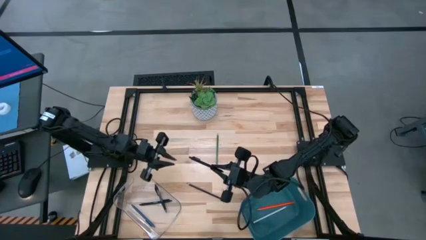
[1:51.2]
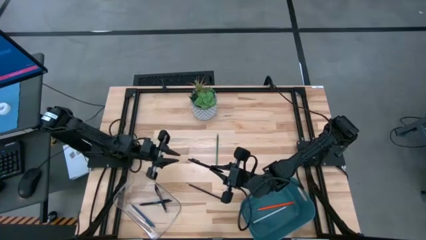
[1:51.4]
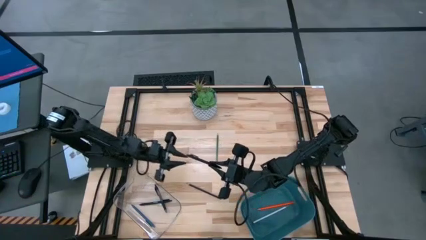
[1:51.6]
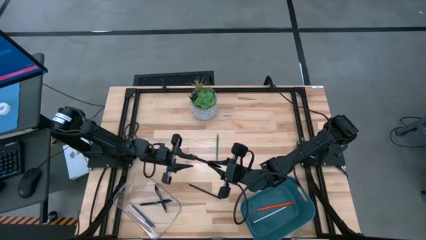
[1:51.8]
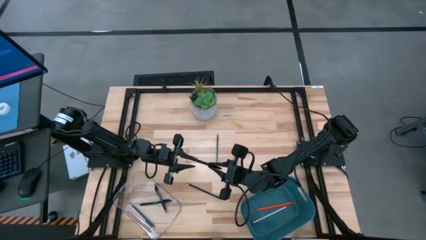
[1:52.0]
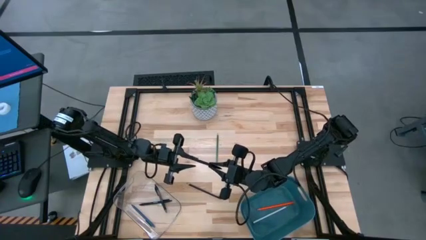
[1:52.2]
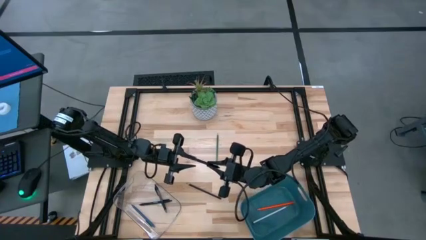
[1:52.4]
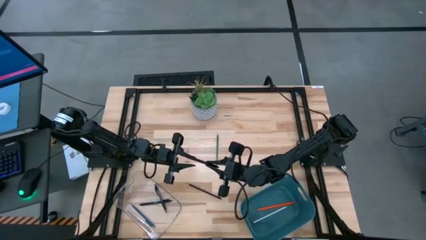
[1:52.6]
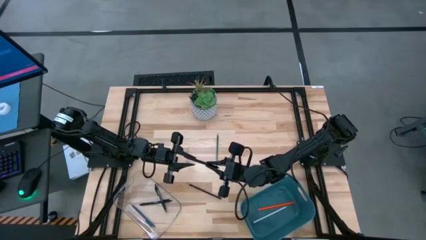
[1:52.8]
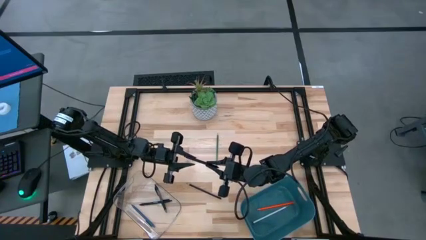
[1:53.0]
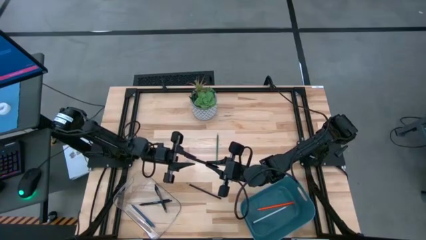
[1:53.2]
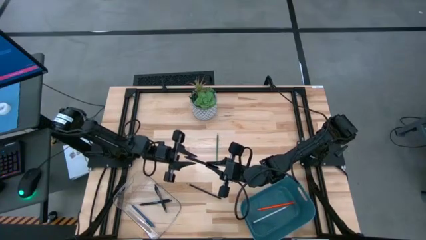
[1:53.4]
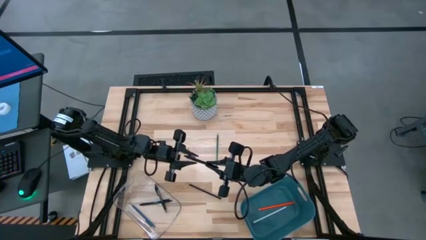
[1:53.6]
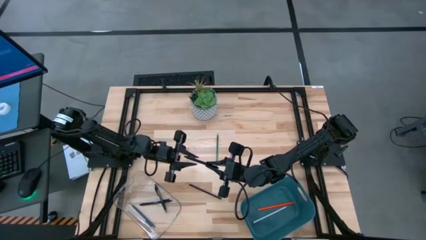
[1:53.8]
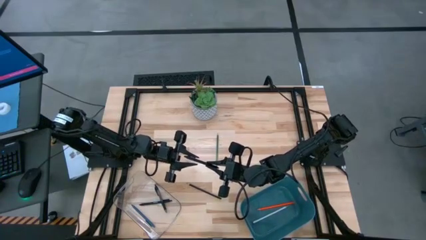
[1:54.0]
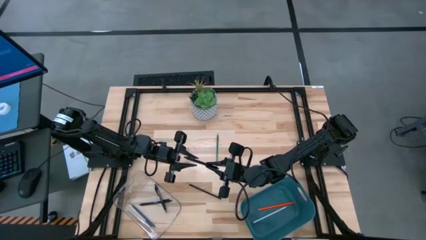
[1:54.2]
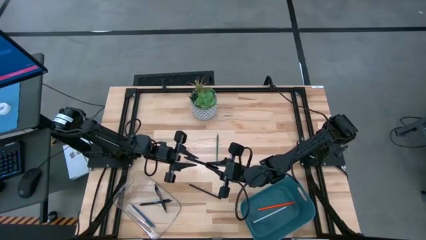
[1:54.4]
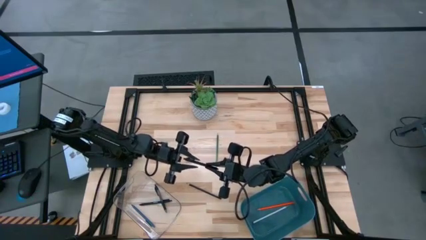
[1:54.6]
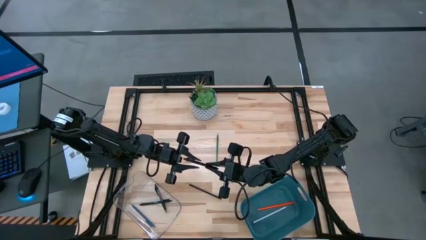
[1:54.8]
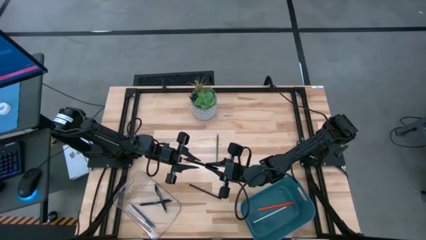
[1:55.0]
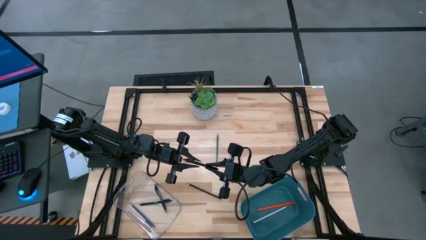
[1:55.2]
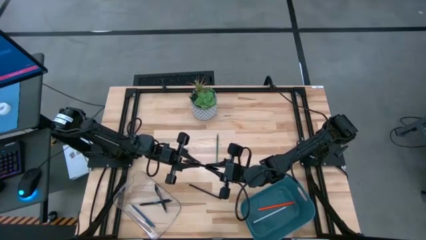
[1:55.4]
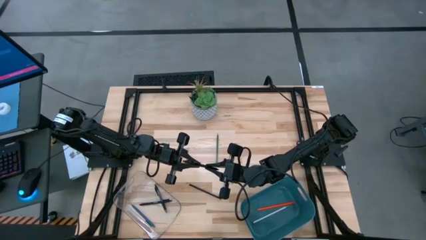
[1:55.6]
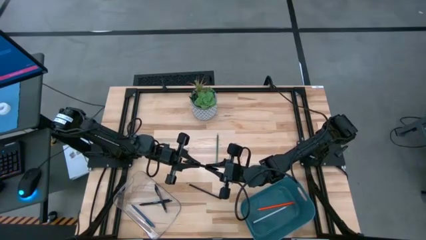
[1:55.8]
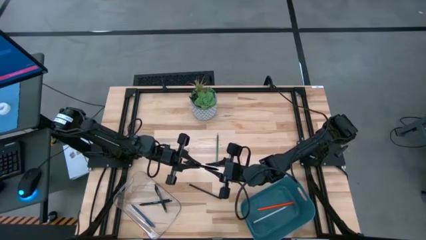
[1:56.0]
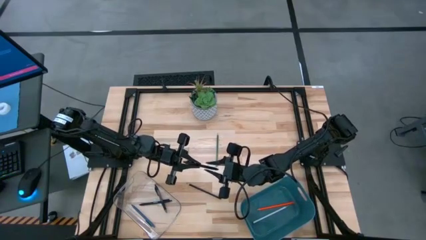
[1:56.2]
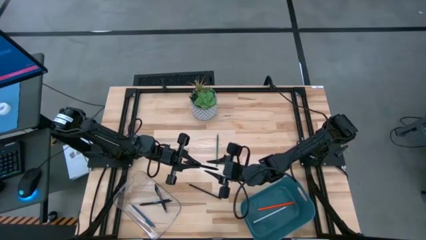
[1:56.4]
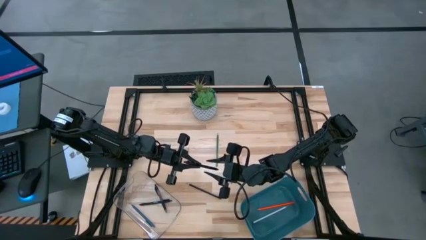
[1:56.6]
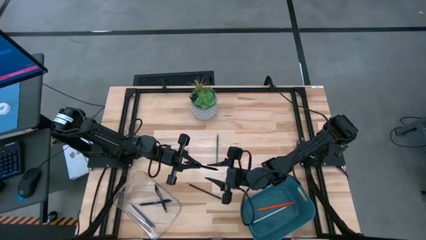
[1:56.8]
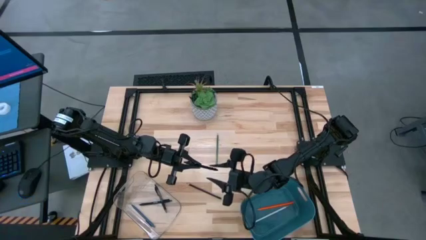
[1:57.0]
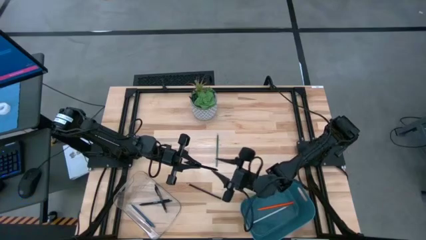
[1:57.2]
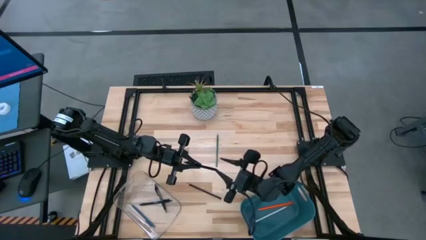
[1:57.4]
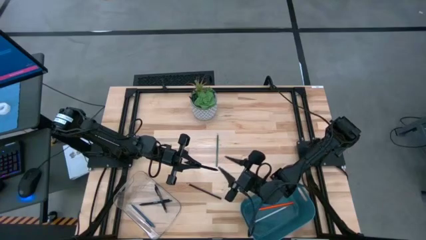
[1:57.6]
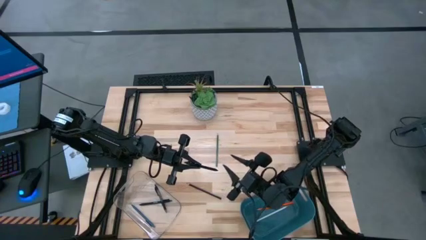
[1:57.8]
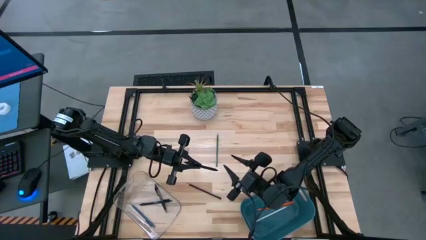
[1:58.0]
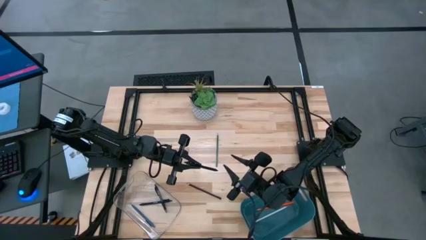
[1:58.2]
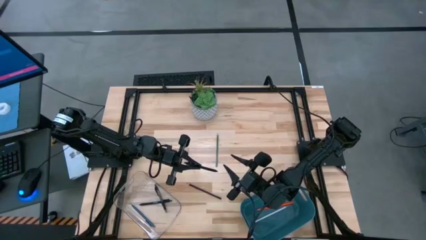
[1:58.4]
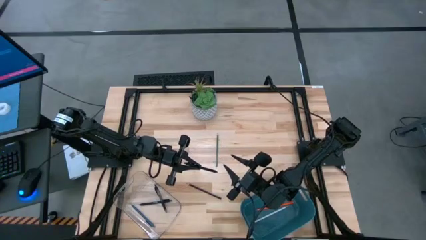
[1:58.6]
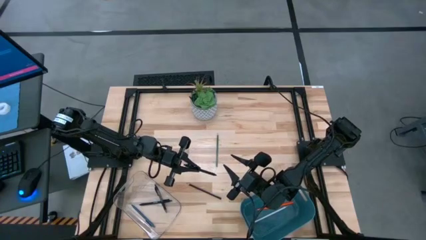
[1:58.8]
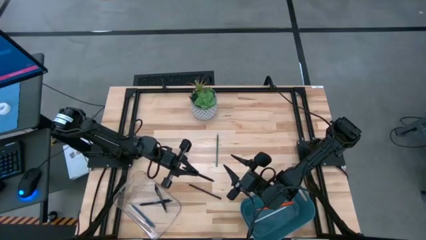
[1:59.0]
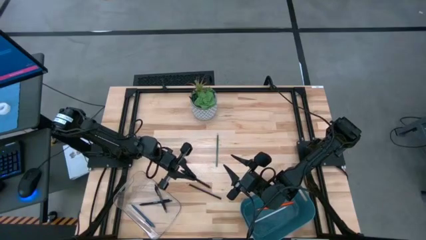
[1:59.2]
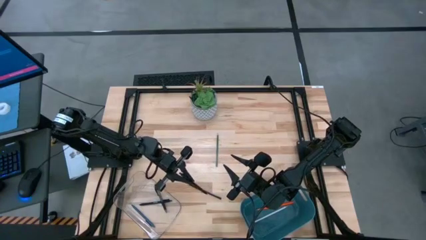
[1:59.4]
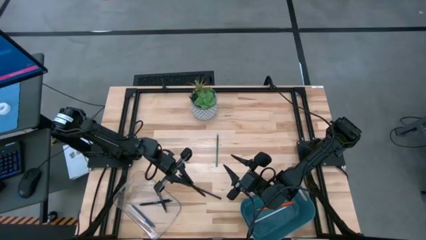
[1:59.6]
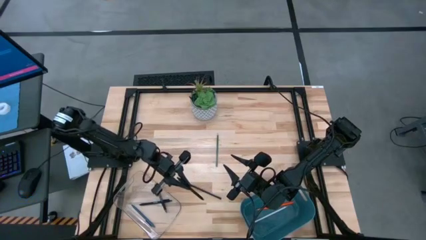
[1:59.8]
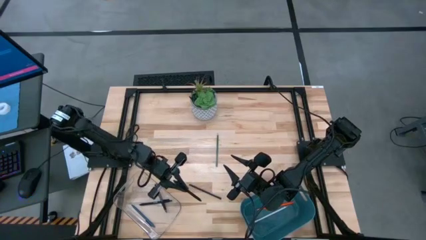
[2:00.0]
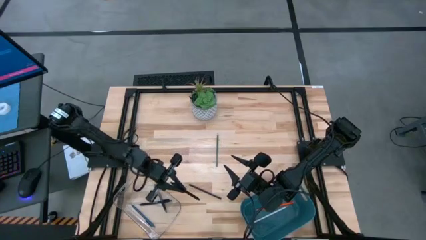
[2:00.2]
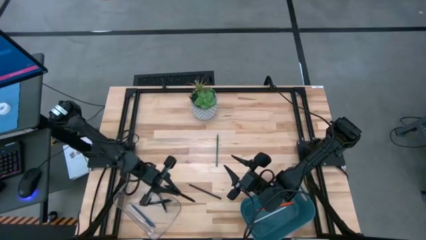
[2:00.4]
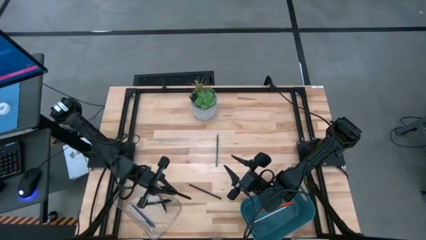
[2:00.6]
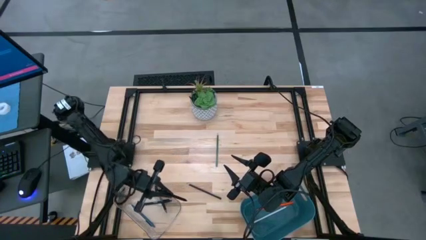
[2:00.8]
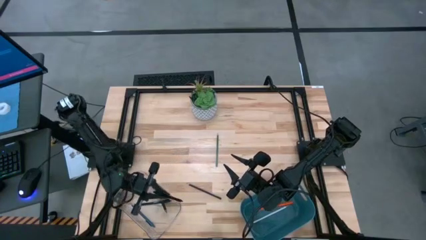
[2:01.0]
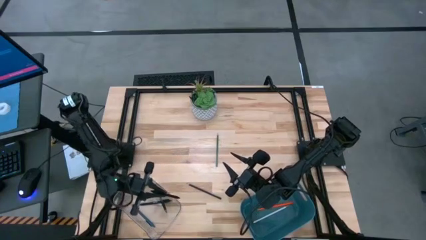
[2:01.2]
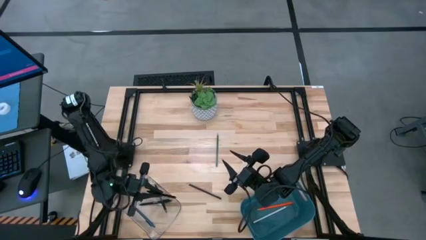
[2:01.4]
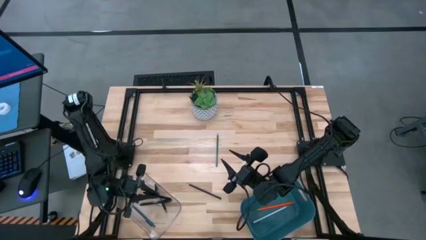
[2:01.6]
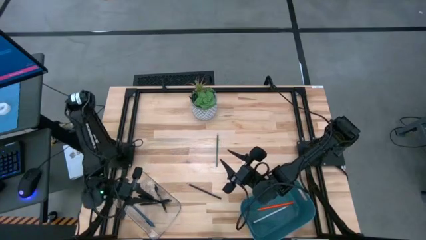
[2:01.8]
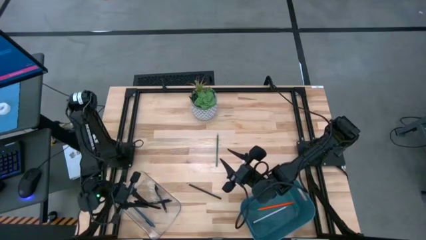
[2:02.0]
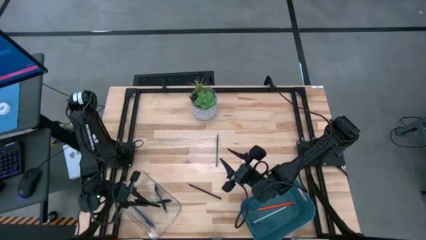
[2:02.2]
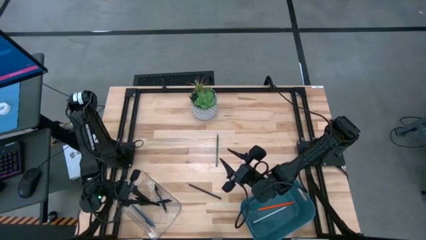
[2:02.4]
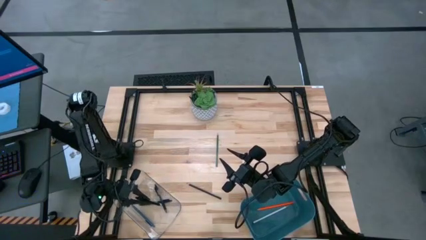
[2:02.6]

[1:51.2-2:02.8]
Task: Sort pens & pencils
Put the black pen into the transparent bin

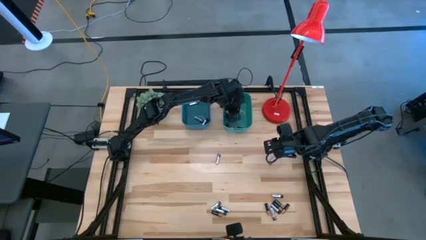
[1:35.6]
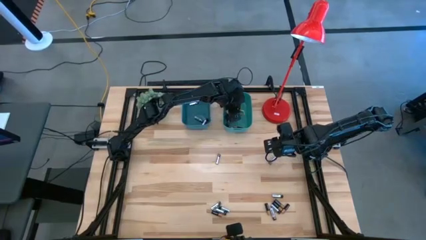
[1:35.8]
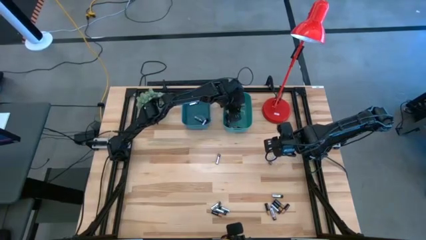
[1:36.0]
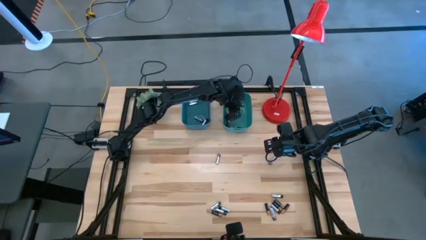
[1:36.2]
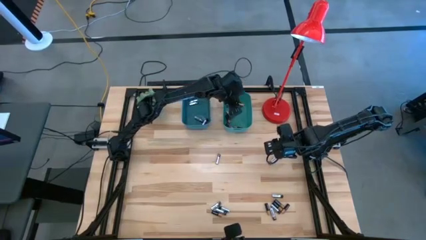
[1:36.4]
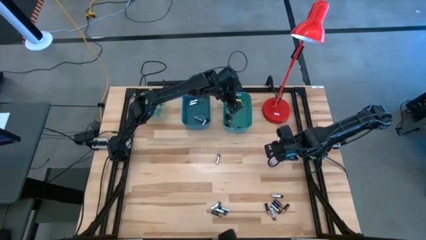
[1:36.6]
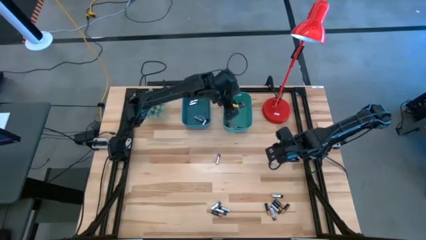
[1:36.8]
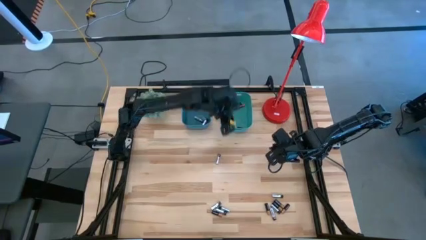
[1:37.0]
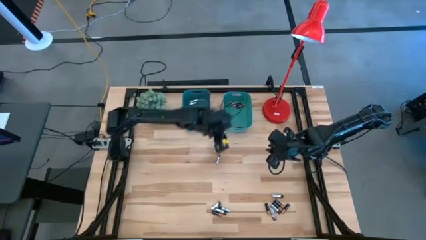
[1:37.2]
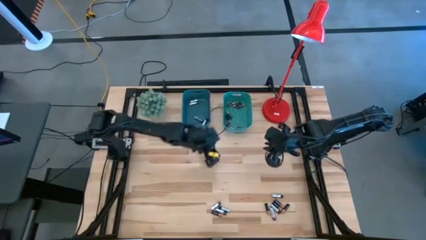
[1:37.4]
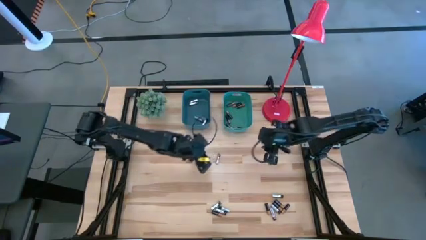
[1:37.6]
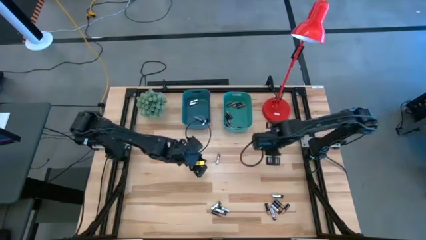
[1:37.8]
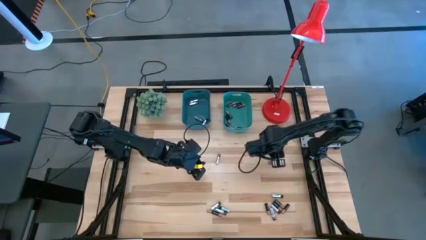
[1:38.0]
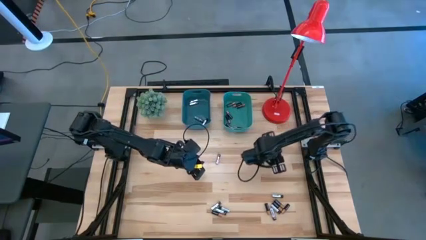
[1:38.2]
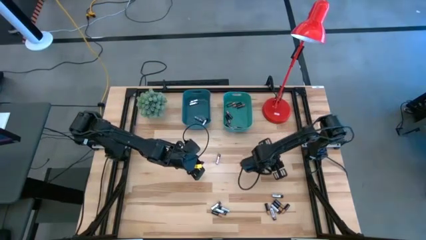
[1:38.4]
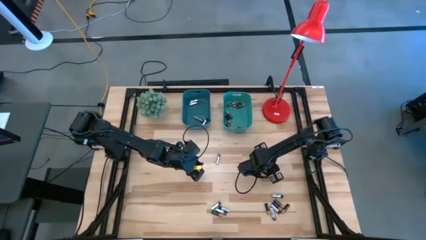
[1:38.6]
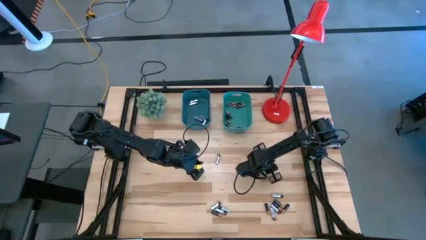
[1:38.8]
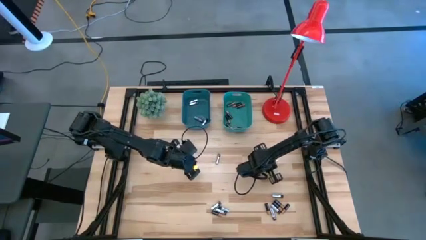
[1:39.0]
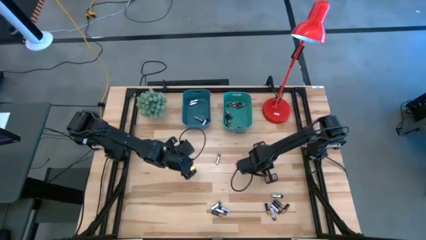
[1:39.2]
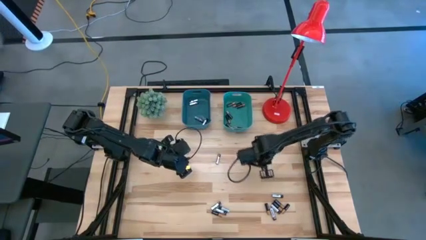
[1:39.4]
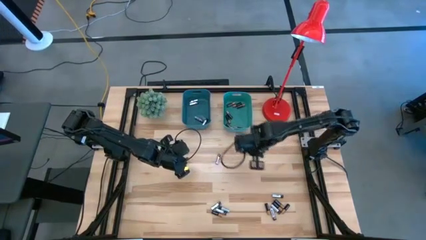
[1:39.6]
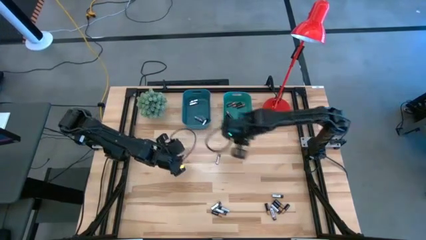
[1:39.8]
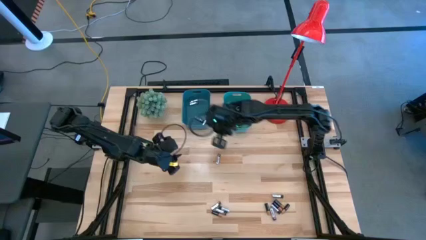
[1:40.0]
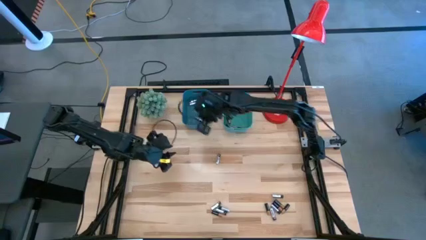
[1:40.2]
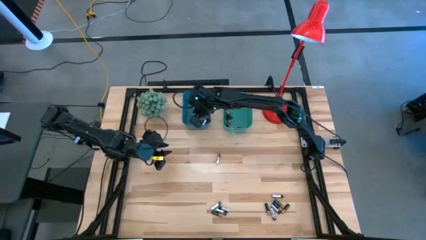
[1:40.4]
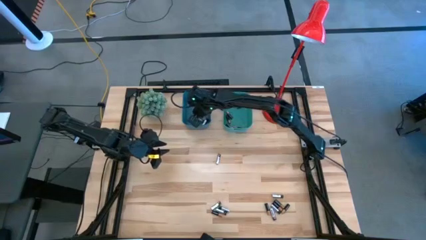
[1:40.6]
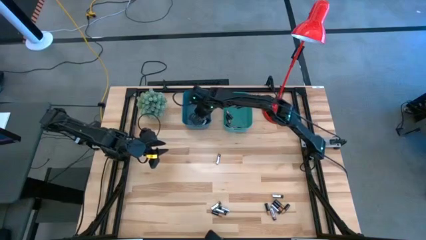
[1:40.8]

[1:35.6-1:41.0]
Task: Sort batteries
Put the silver battery into the blue bin
